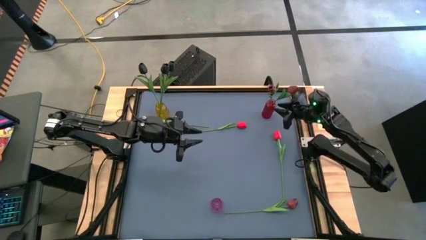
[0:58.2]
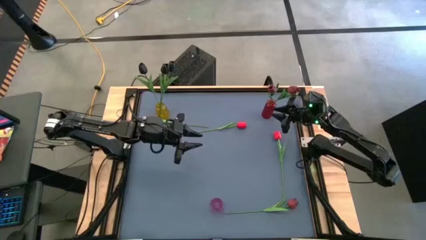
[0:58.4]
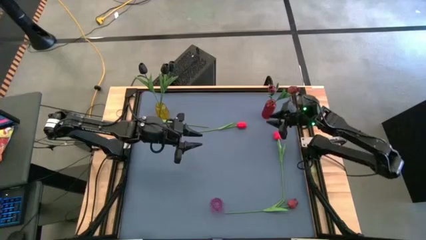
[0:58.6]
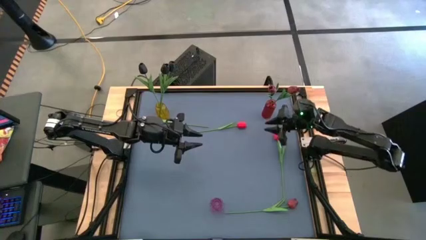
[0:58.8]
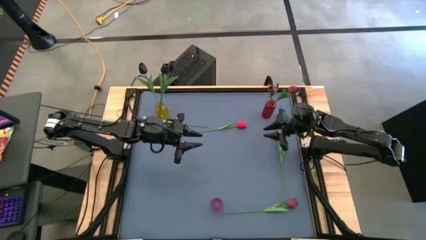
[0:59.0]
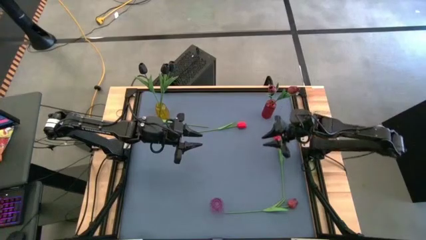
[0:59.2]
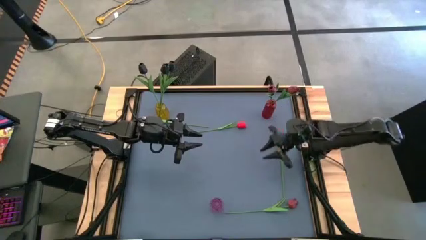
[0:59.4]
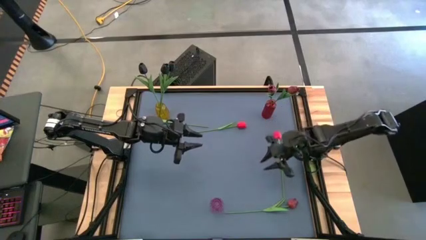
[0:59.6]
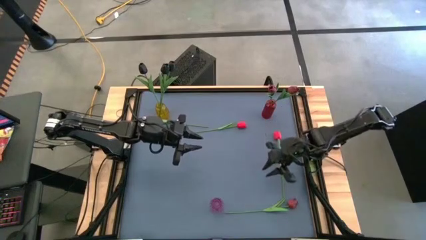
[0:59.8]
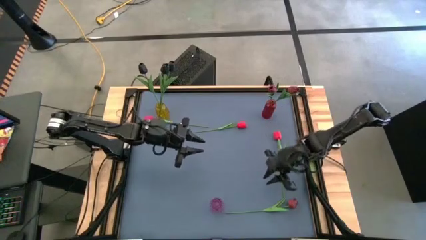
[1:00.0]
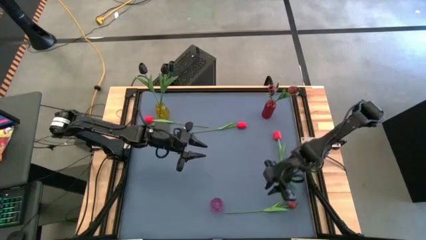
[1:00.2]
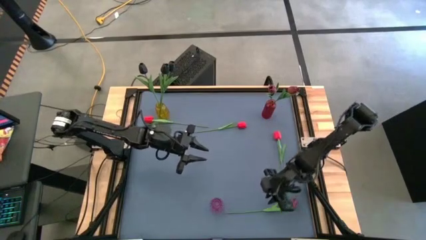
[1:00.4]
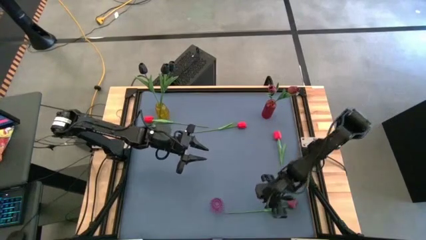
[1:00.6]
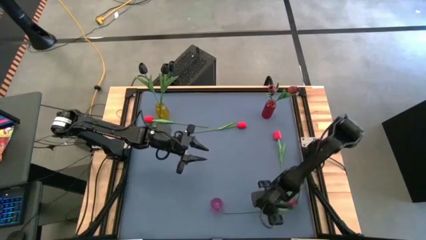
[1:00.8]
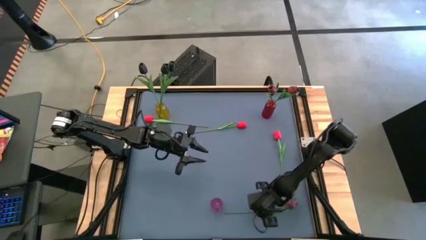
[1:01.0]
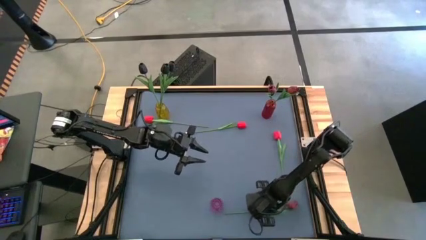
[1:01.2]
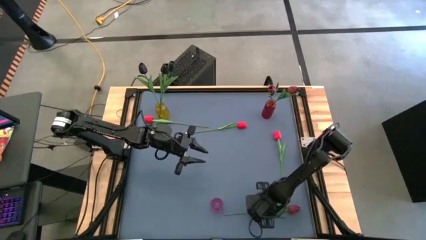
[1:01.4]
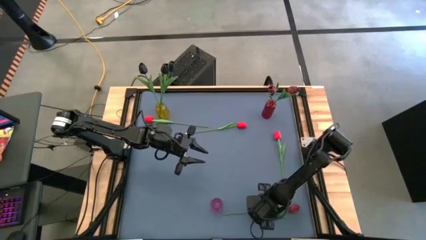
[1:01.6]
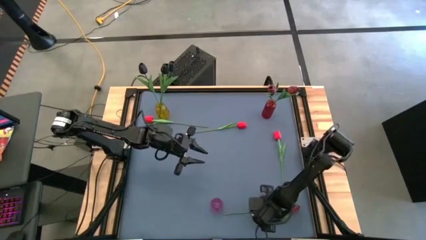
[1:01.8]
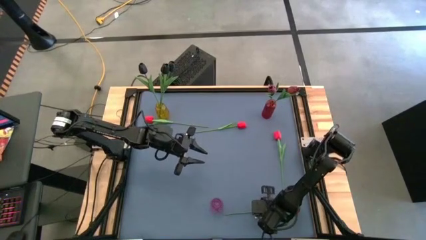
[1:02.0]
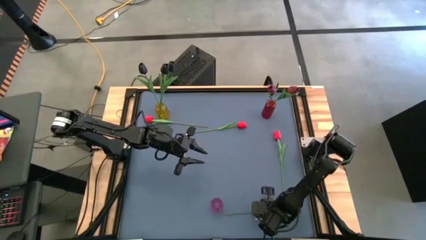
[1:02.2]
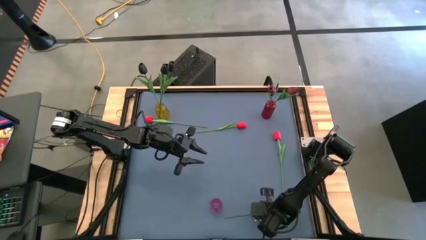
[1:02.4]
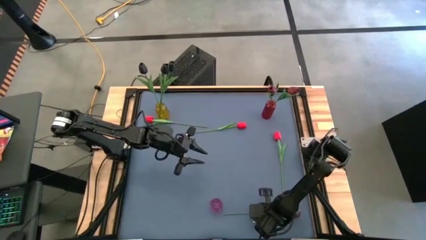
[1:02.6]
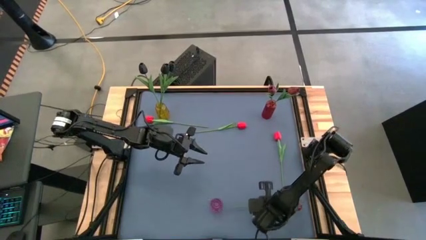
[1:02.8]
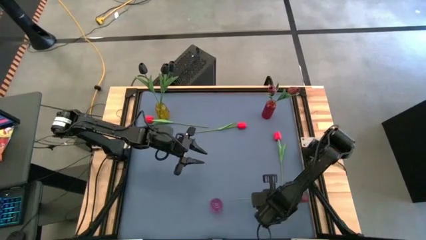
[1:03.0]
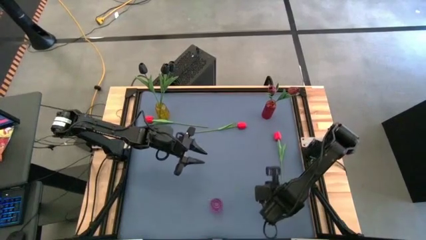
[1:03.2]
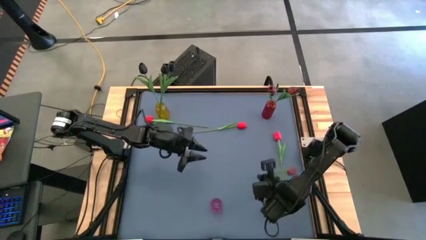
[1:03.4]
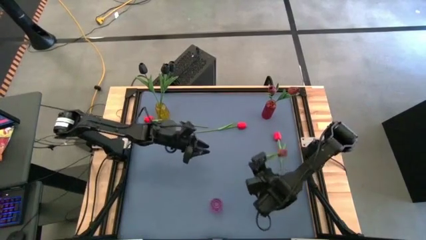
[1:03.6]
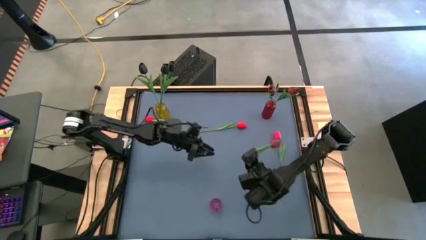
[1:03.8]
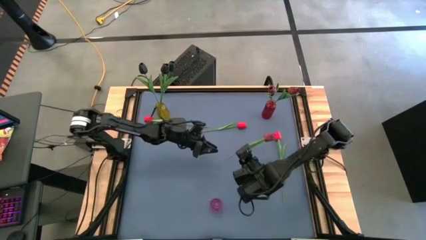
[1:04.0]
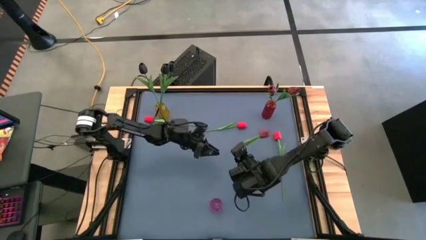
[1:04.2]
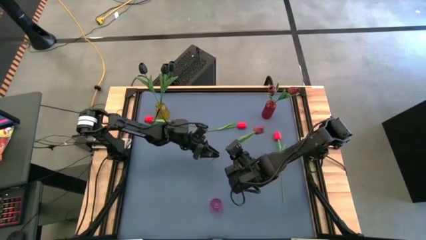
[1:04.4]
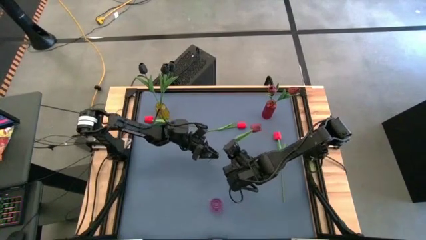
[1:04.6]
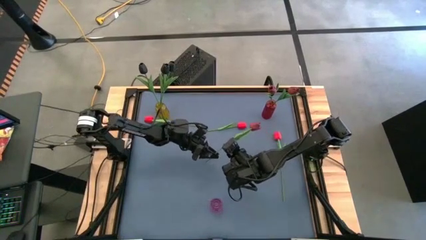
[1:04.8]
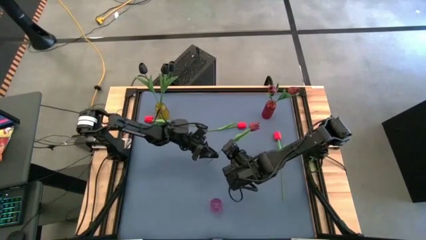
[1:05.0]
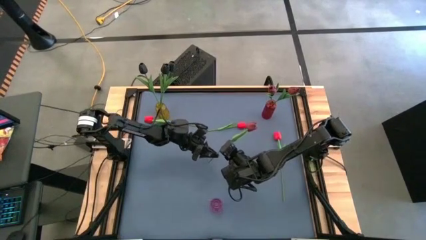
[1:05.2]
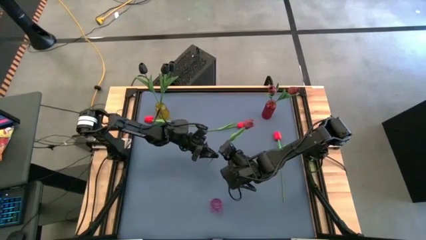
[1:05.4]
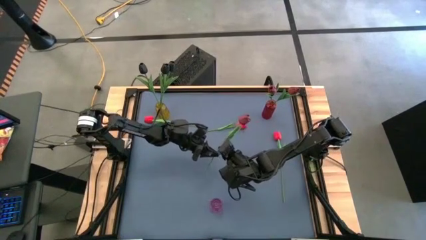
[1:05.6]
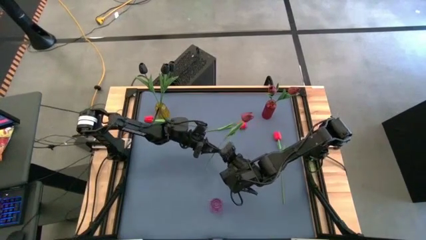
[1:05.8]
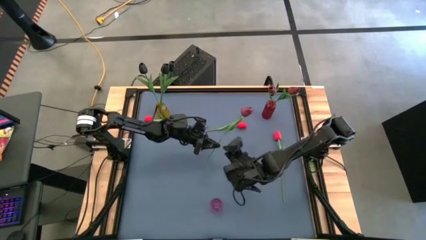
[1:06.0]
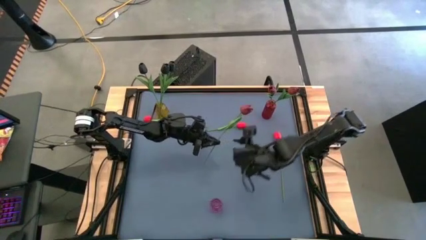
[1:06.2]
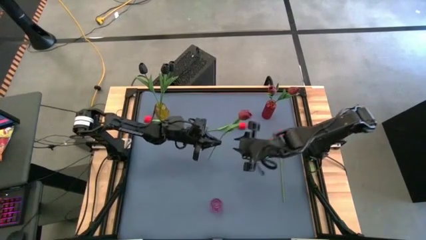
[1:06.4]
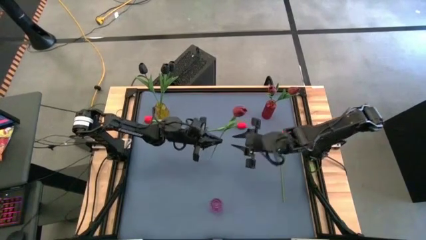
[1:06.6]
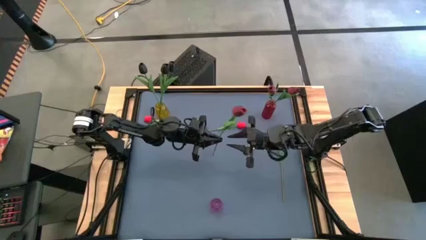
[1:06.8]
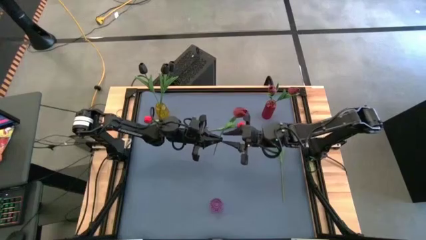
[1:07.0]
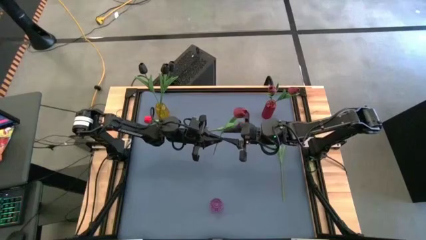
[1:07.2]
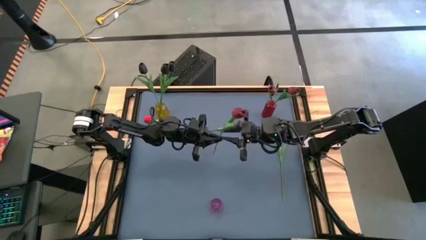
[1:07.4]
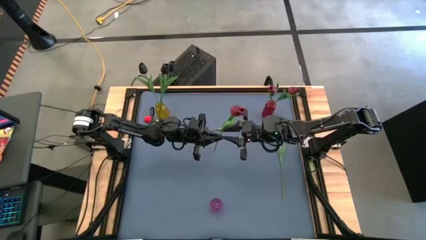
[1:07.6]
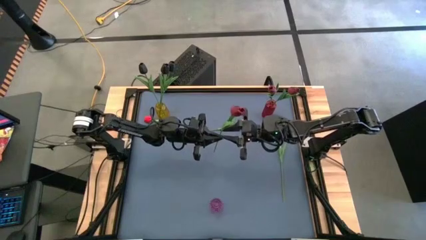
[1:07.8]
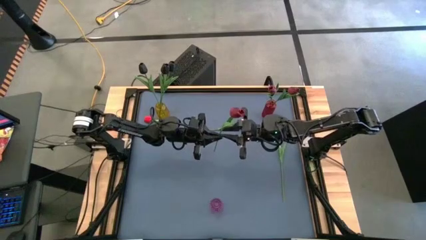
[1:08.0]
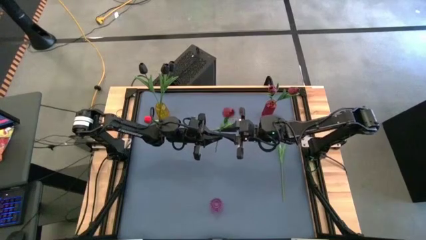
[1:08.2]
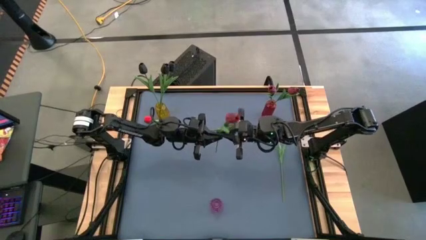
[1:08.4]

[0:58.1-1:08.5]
Task: Sort flowers into vase by color
Put the purple flower into the red vase

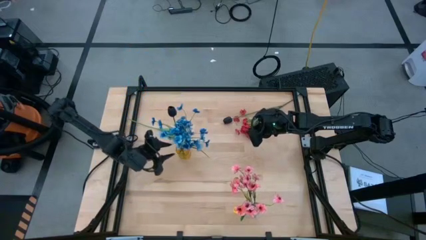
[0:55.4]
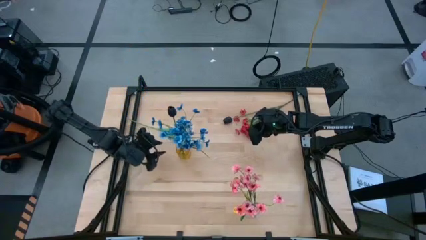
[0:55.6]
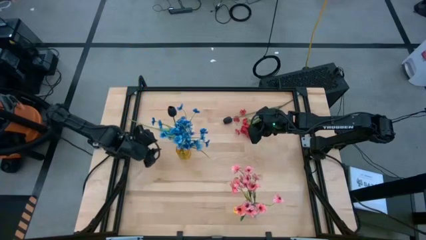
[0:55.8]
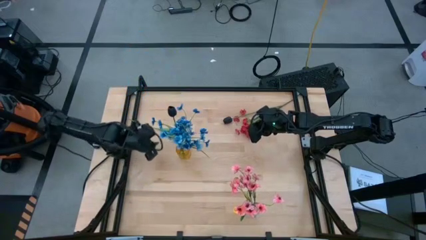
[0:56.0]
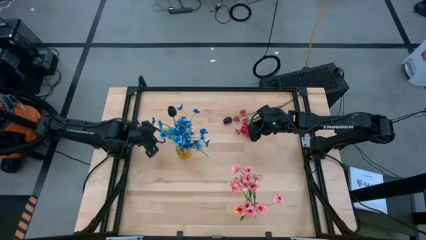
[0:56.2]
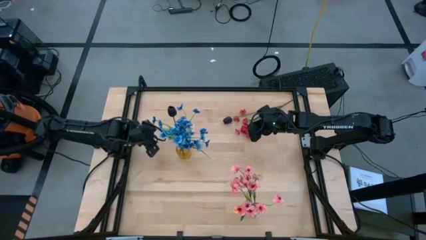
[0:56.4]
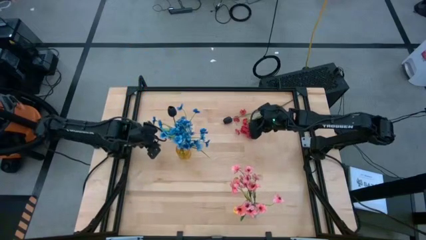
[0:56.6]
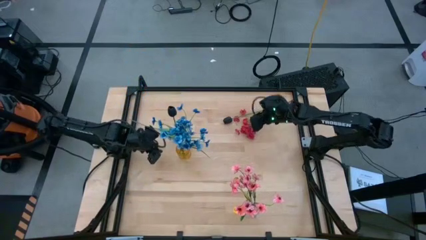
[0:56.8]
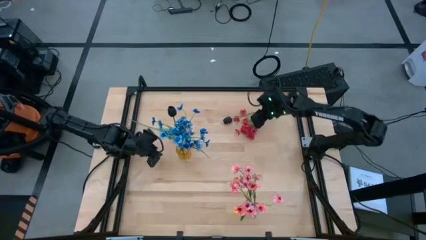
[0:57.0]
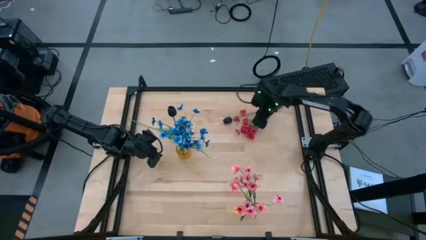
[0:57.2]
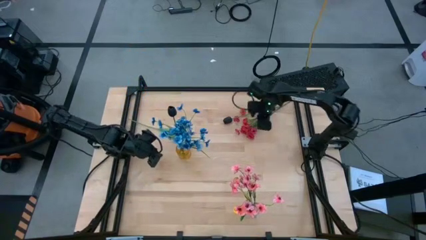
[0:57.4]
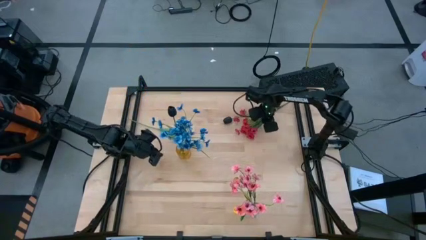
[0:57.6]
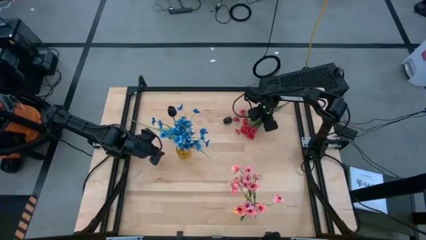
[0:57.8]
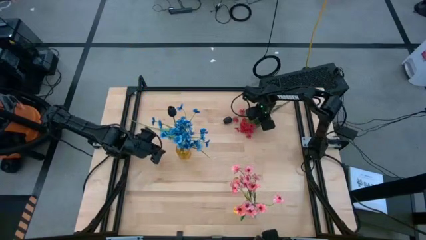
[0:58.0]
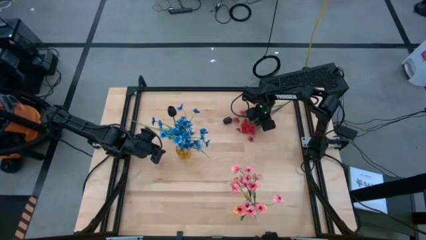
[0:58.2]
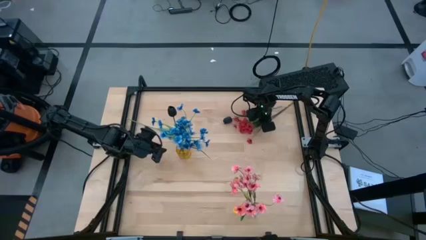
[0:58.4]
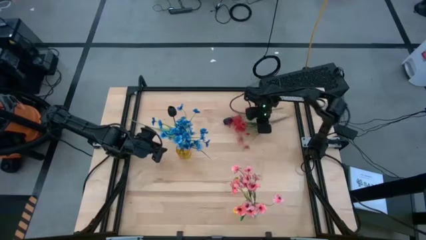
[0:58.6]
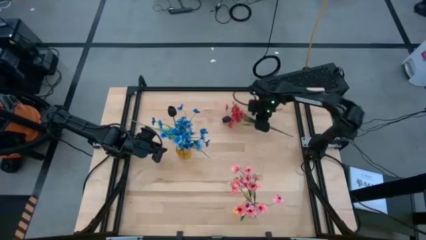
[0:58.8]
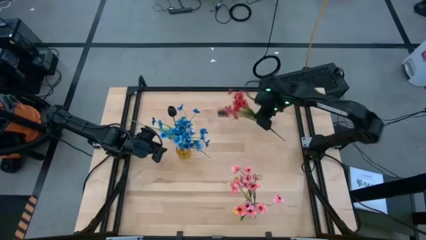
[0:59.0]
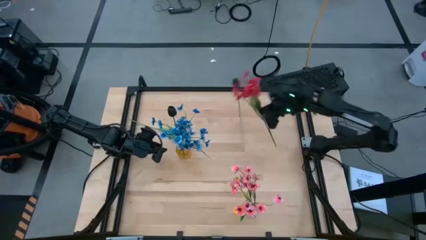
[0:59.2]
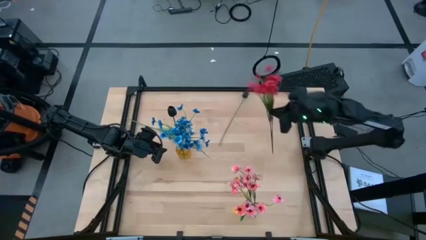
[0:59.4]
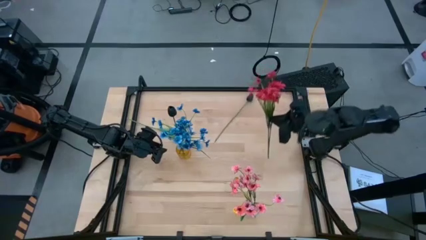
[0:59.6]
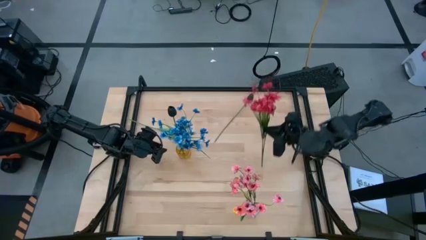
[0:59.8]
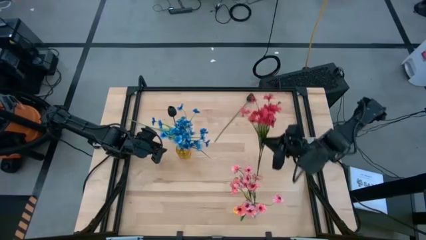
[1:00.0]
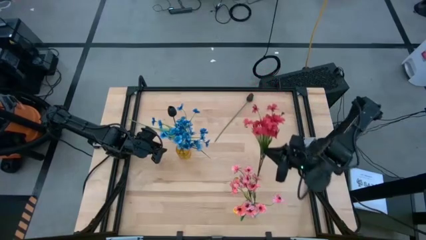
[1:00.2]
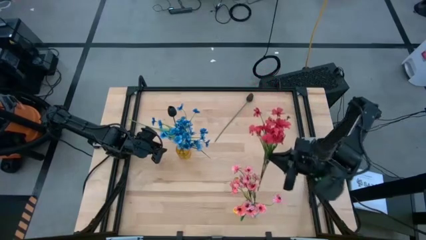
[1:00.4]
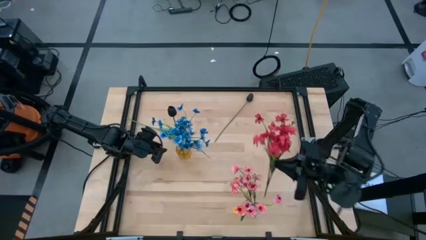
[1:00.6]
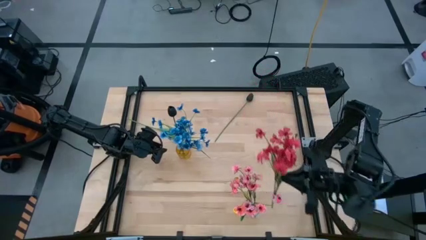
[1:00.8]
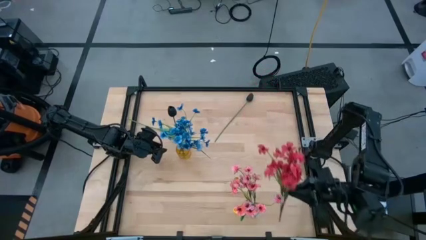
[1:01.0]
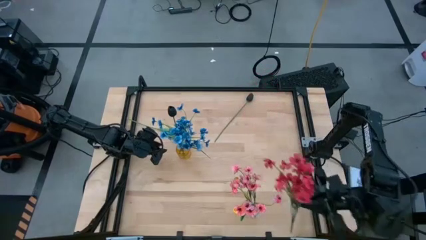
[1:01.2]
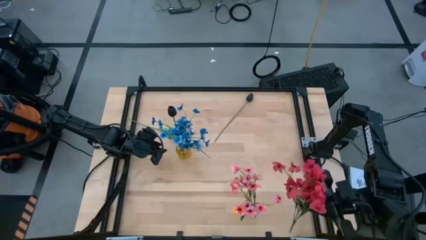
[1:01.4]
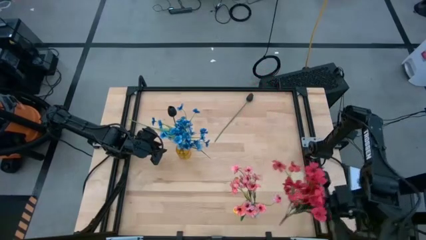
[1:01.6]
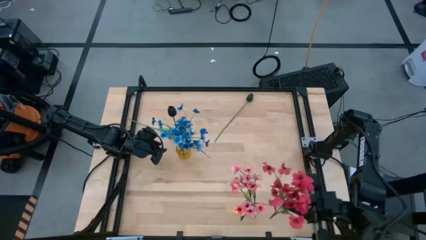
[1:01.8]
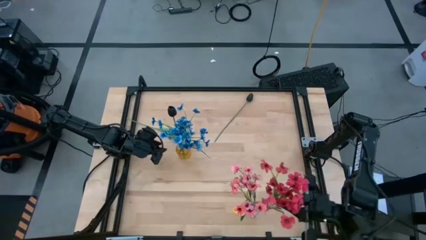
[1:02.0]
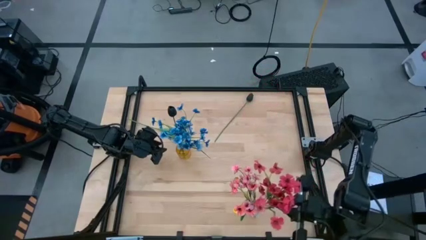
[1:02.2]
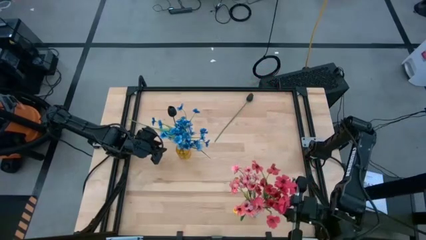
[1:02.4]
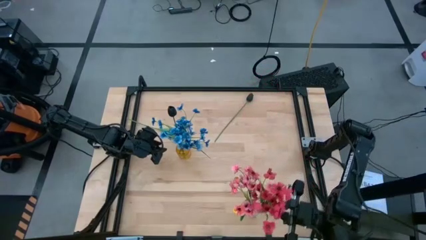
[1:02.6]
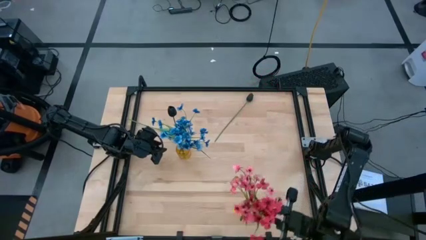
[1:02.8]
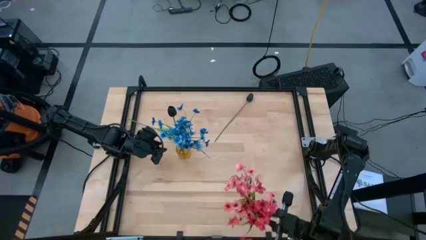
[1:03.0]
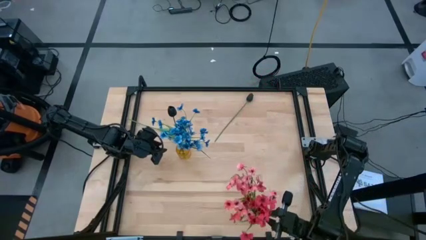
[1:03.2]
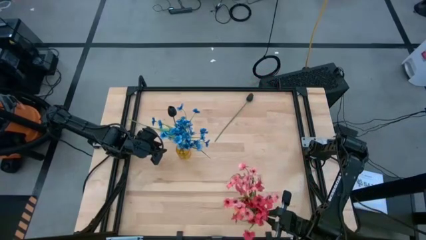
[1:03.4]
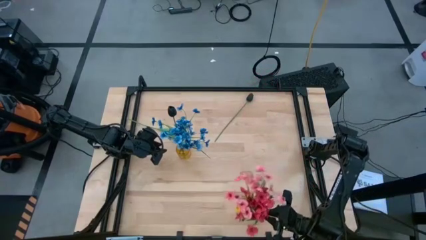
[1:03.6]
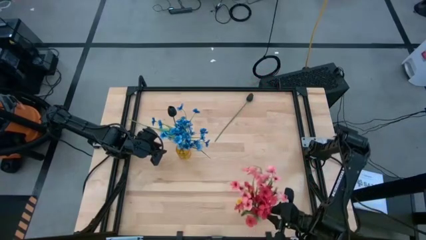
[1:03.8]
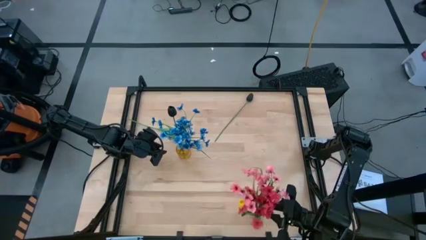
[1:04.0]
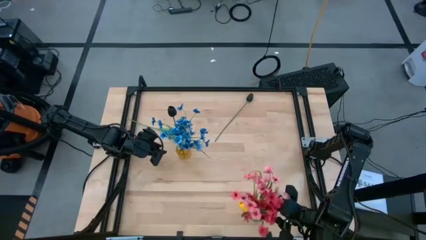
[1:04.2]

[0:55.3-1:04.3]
Task: Sort flowers into vase by color
Put the red flowers into the transparent vase
